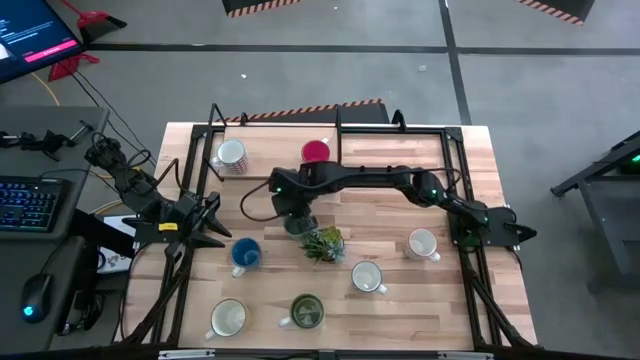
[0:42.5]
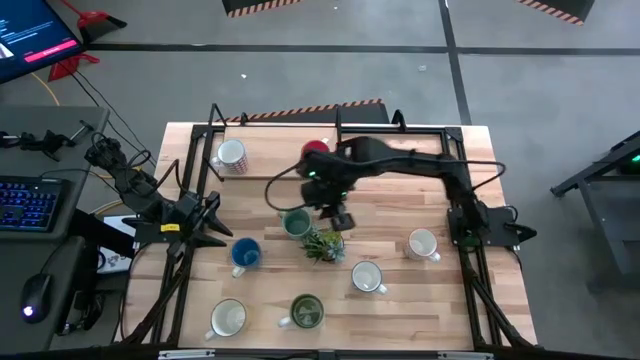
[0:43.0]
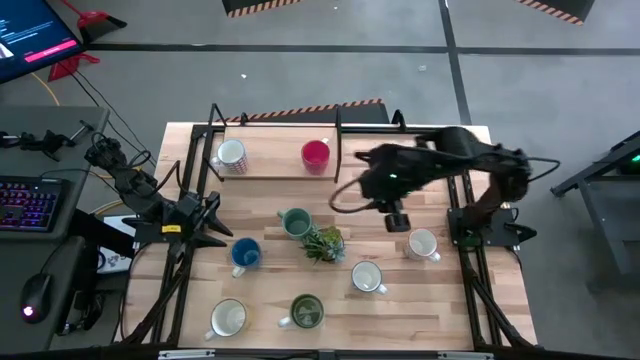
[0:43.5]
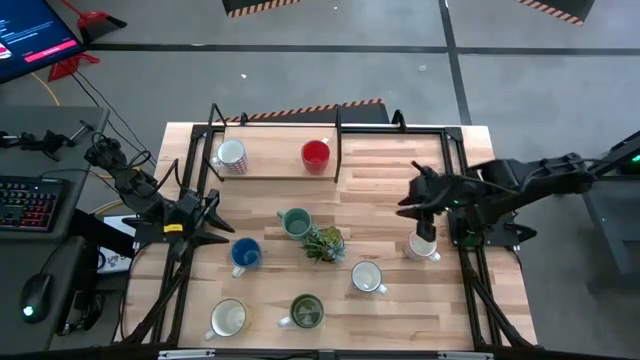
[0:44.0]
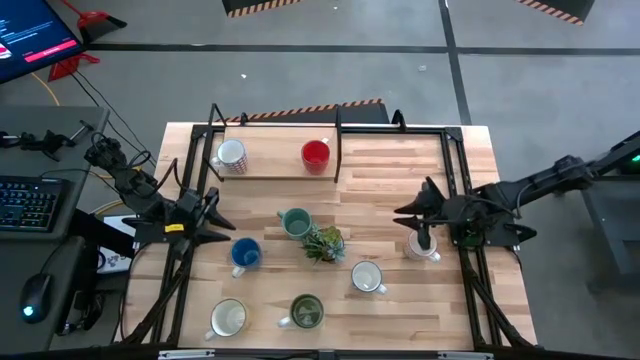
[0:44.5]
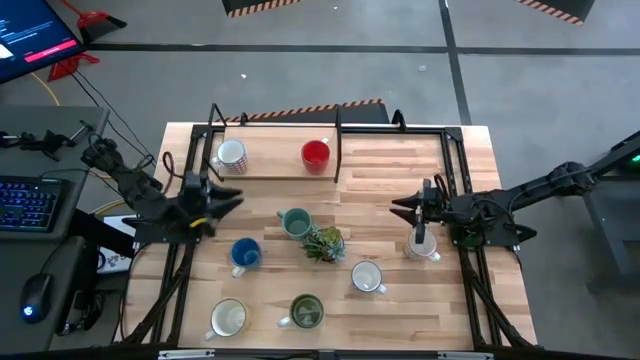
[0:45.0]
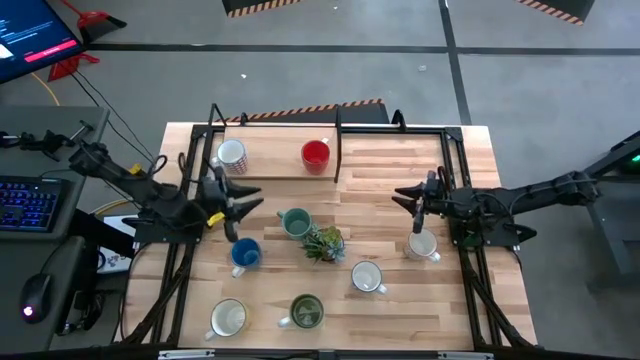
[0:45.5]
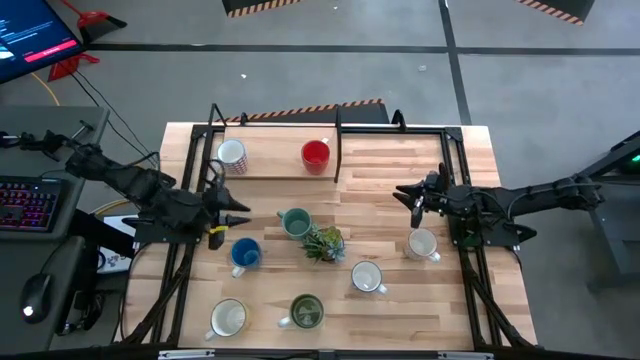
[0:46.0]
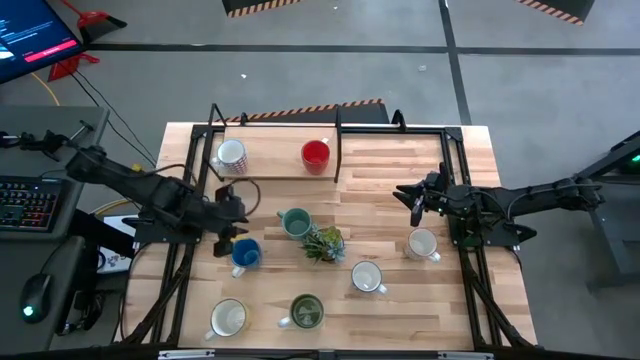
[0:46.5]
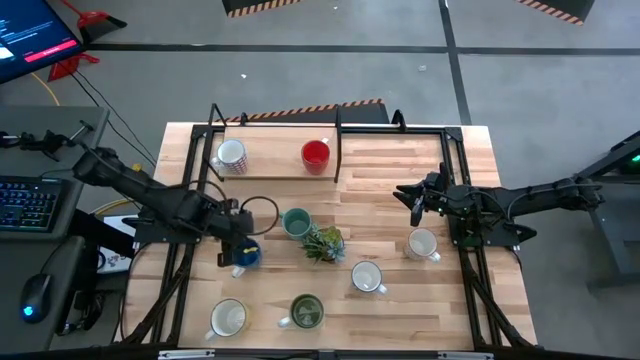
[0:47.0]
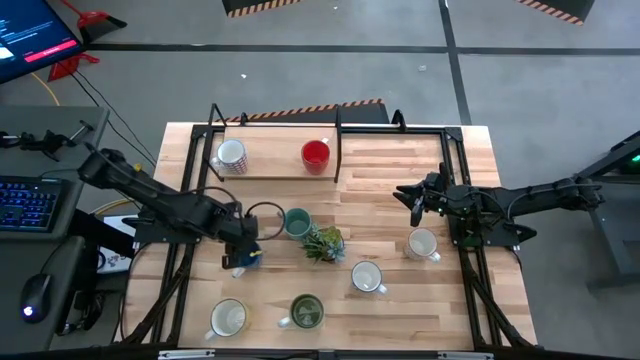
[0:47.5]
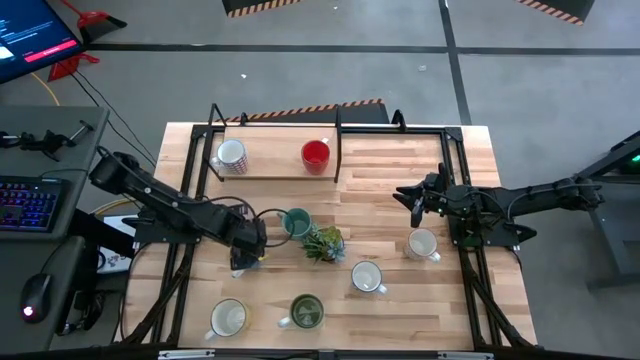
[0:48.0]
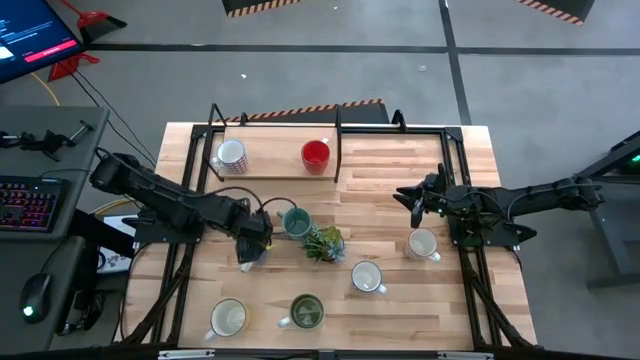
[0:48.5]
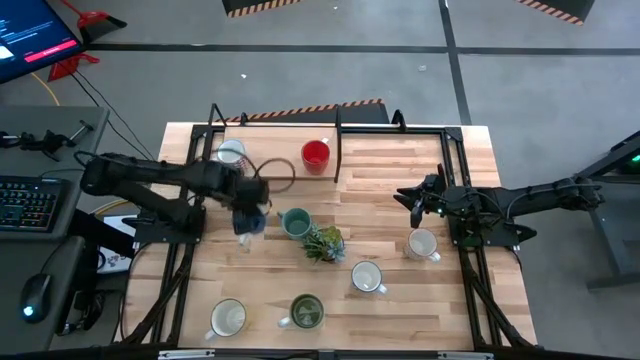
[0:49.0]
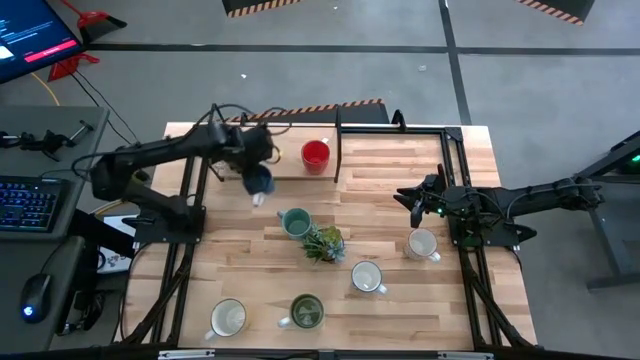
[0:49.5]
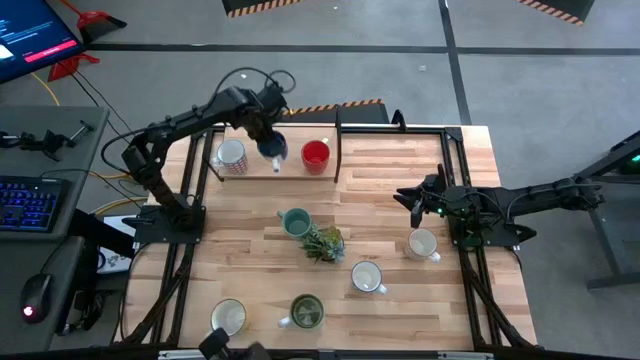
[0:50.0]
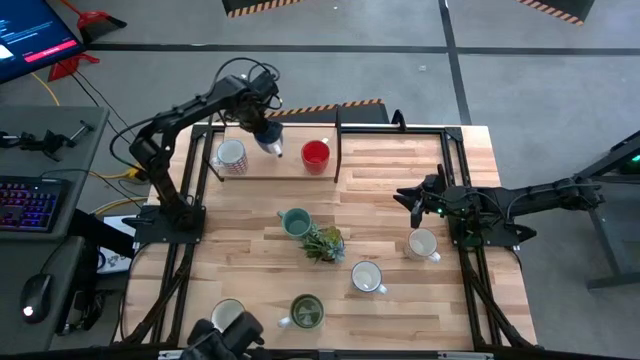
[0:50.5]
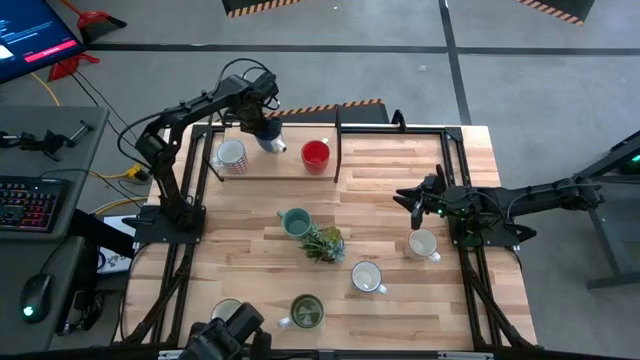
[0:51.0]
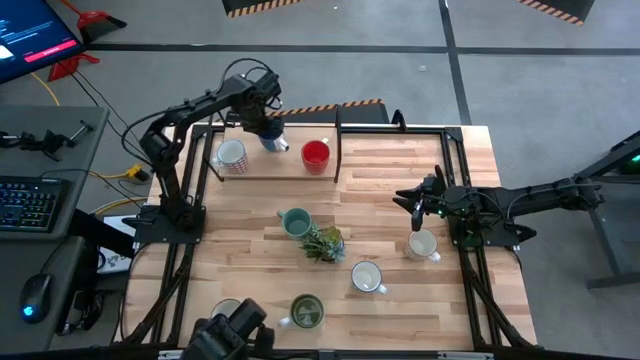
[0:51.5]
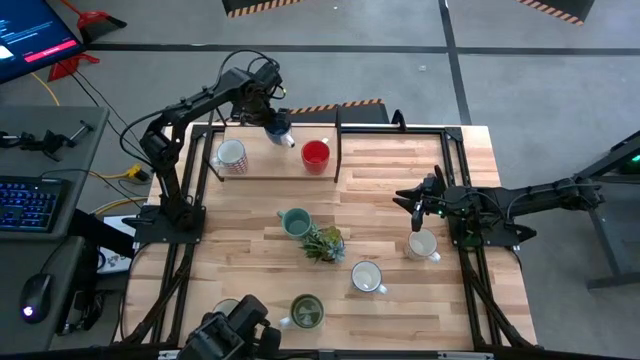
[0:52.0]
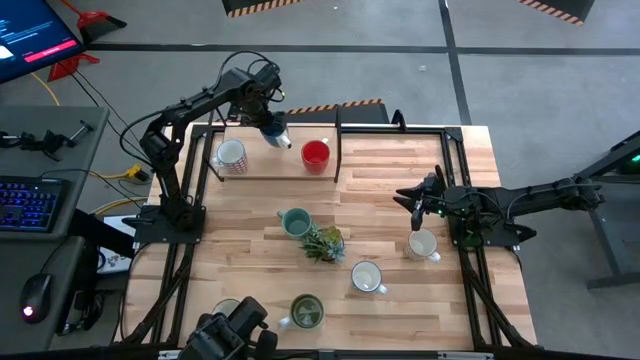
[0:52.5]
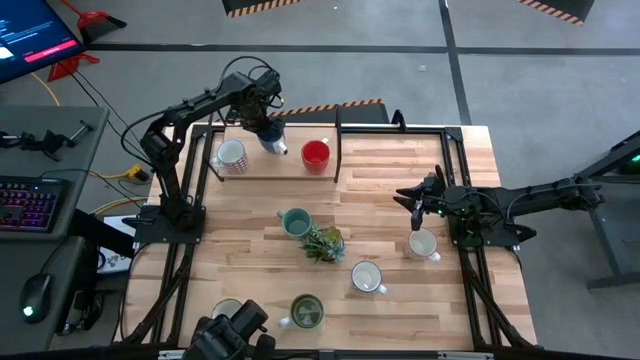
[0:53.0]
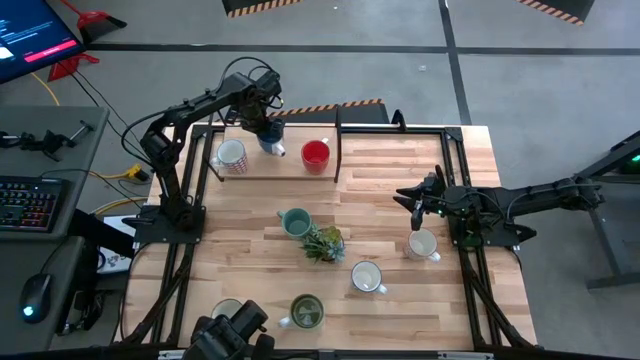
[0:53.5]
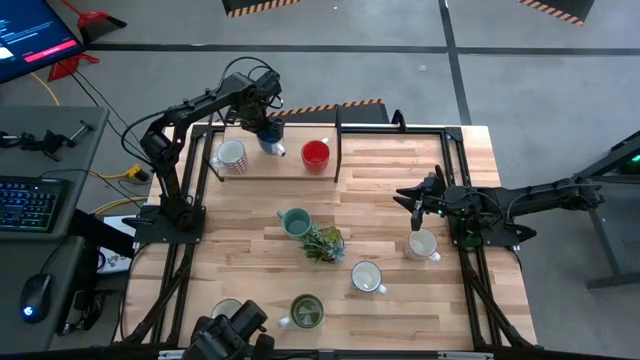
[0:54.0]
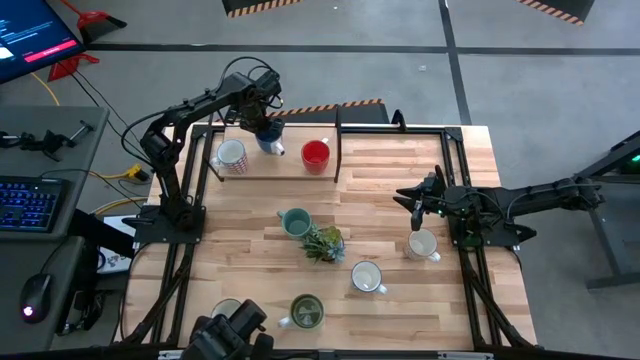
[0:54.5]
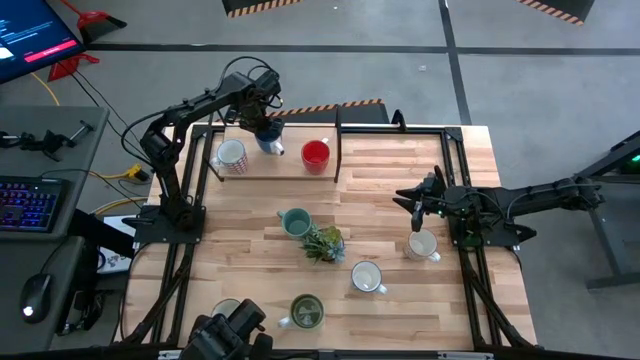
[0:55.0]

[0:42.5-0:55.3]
Task: Place coffee mugs
Put the blue mug on the shelf

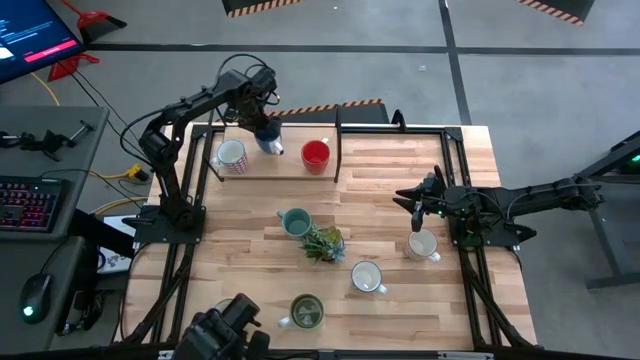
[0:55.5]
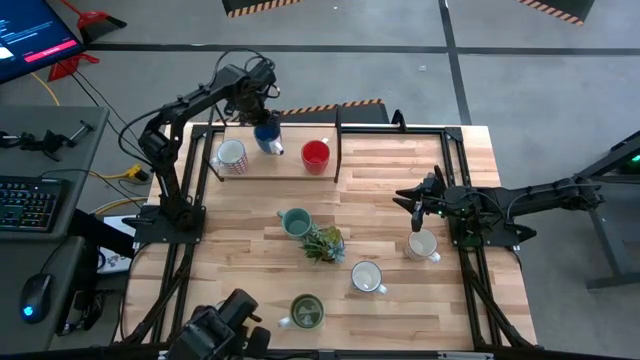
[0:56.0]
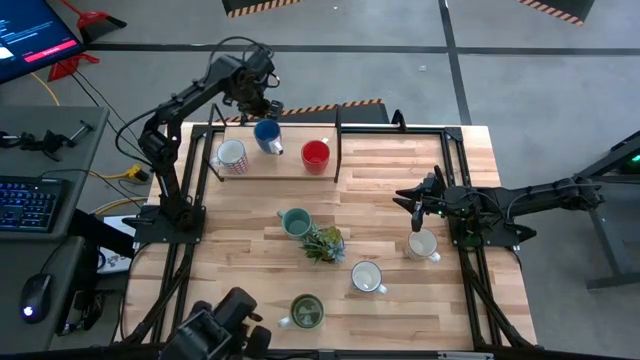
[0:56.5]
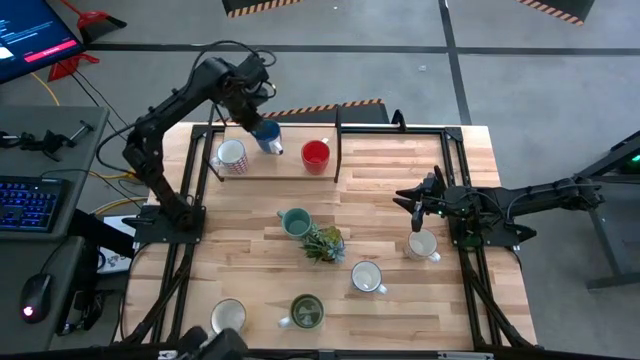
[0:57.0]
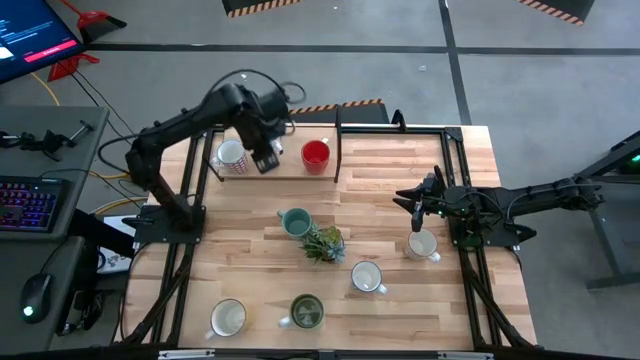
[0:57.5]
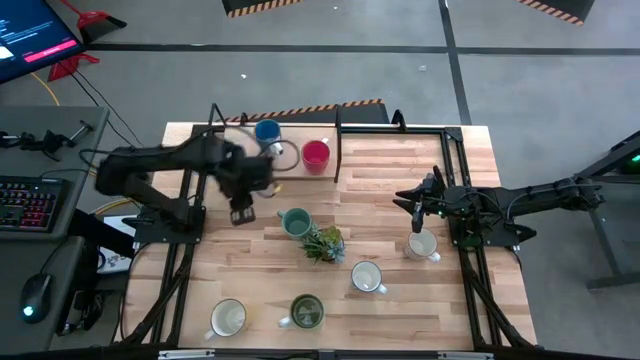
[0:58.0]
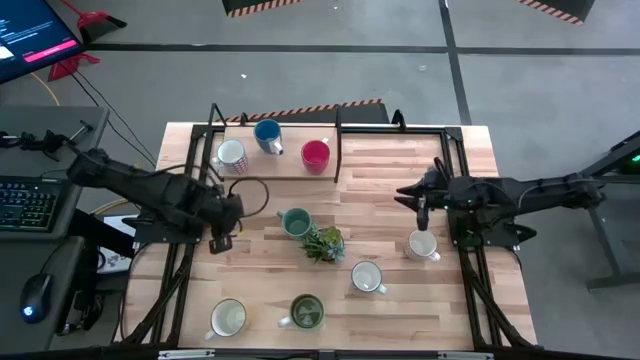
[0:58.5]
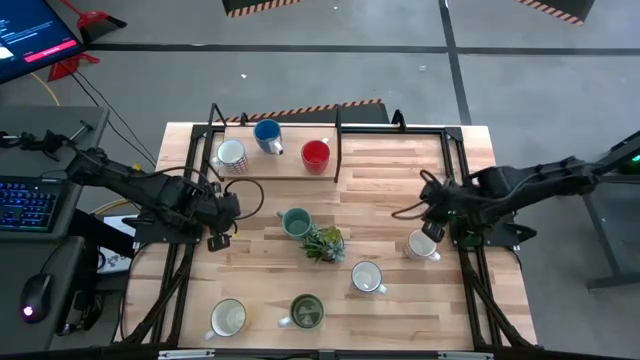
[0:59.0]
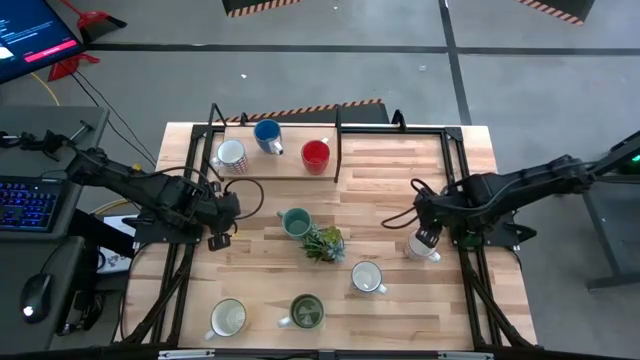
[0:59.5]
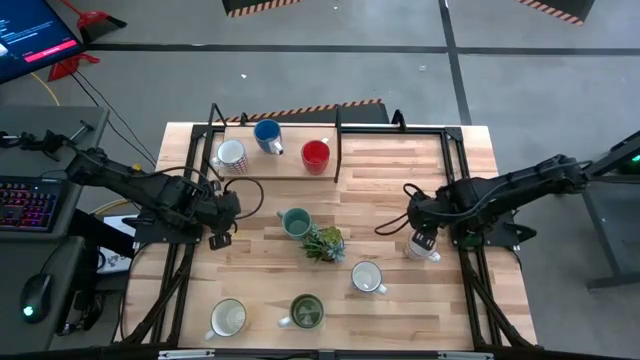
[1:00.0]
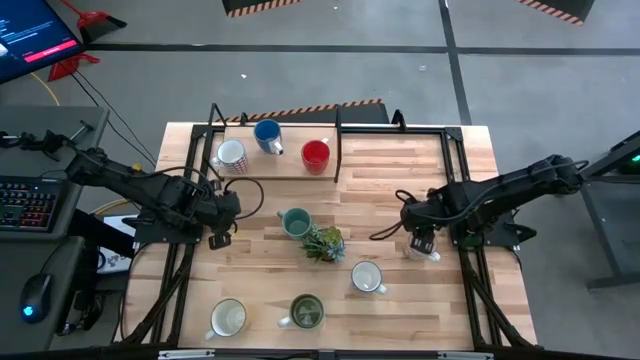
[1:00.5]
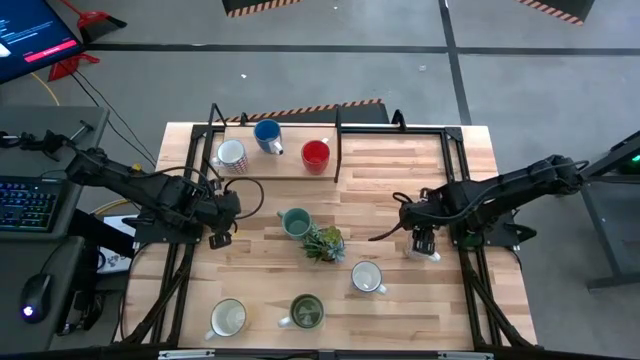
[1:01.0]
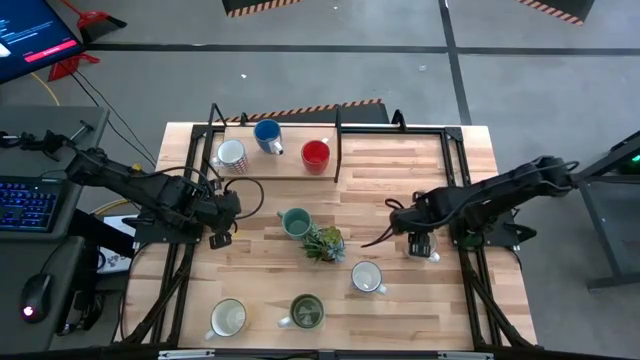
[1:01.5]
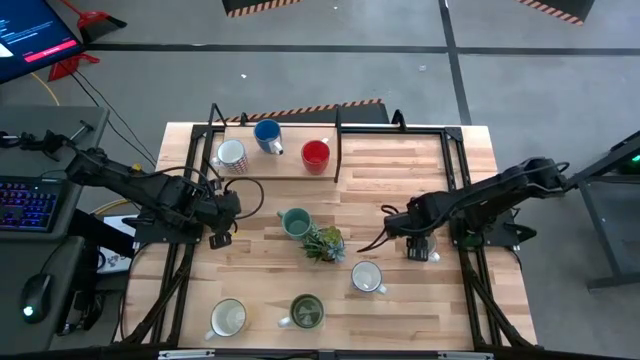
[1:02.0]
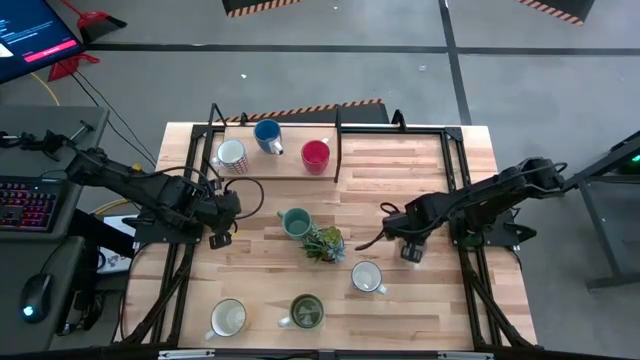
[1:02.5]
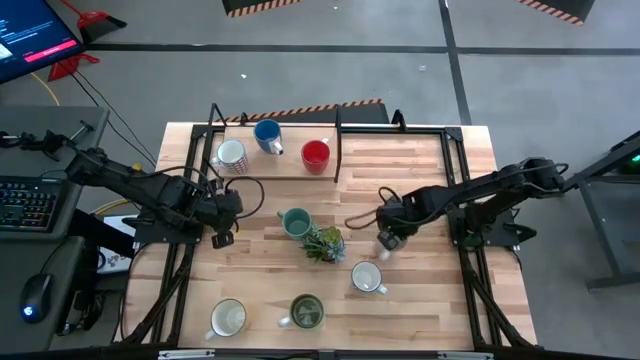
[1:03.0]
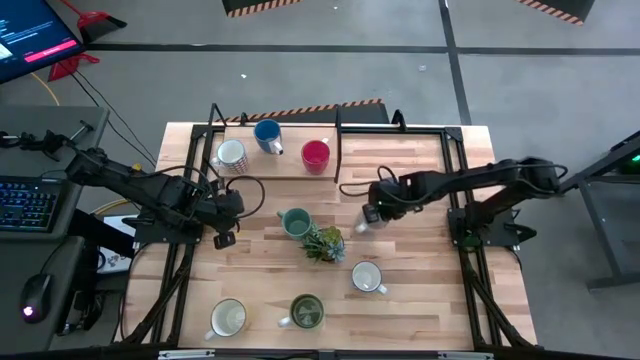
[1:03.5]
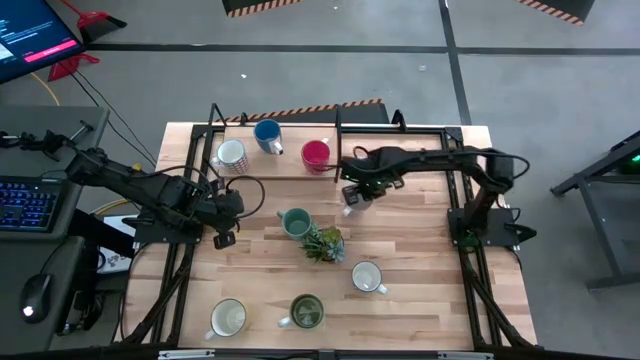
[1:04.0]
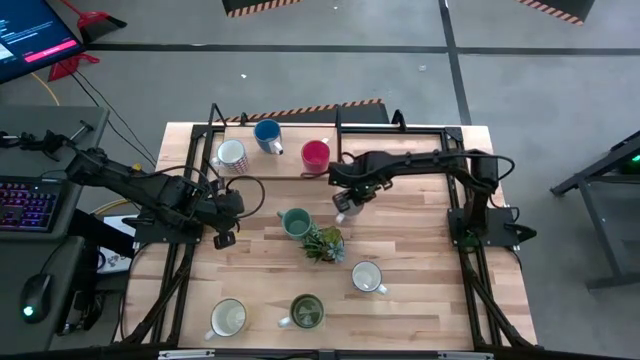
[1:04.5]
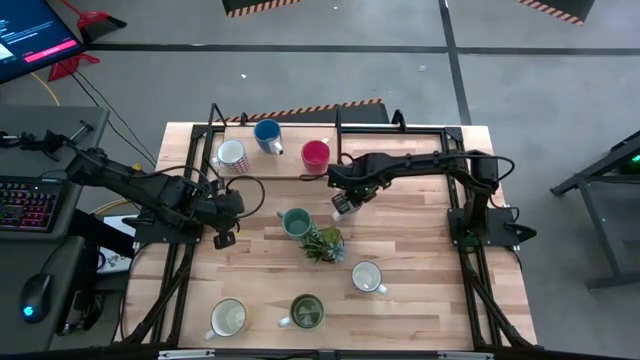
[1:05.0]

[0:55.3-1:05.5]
Move the gray patterned mug to the center of the table
